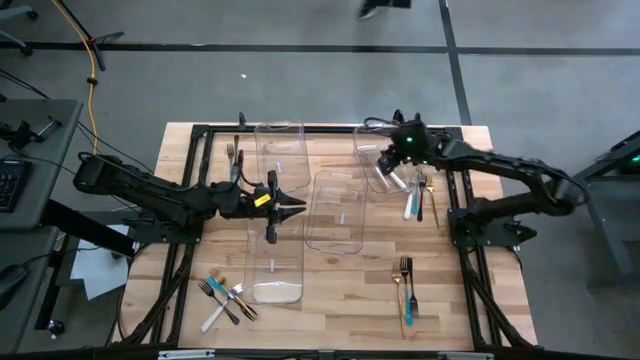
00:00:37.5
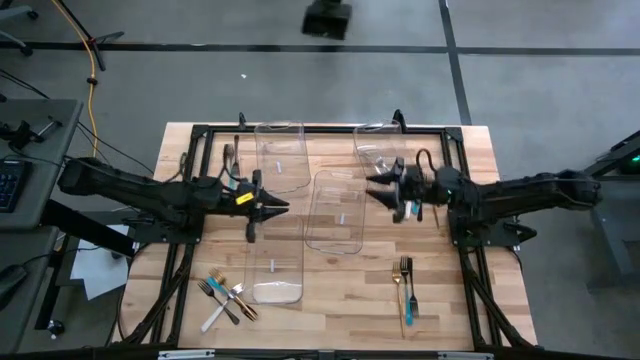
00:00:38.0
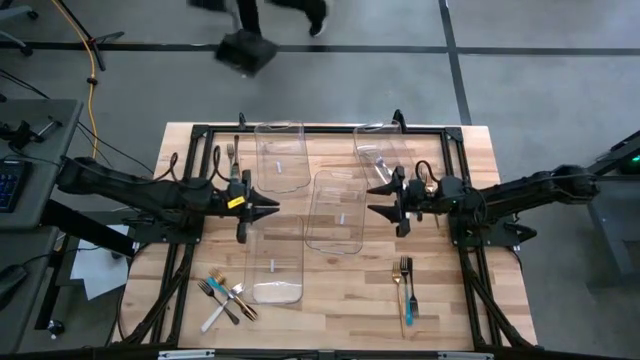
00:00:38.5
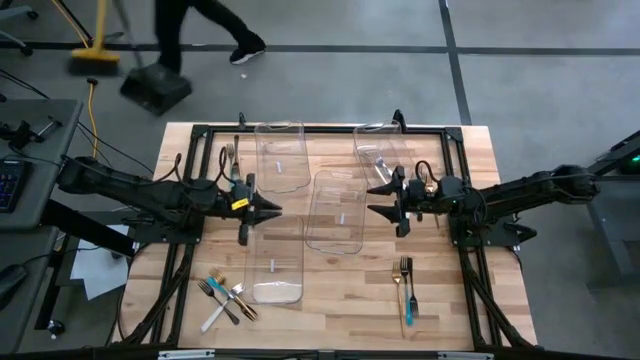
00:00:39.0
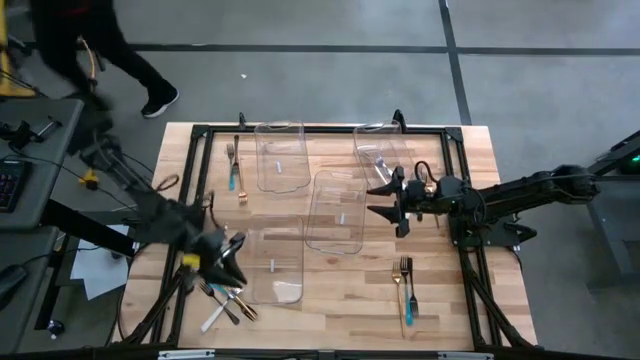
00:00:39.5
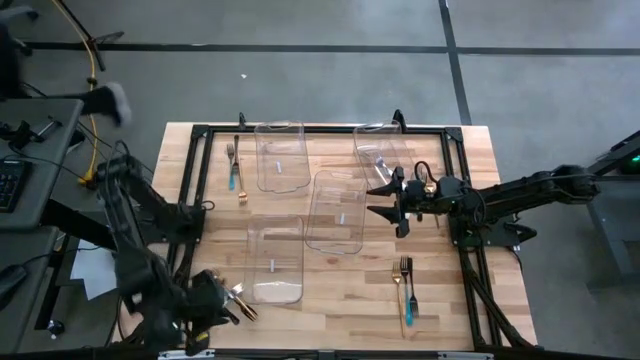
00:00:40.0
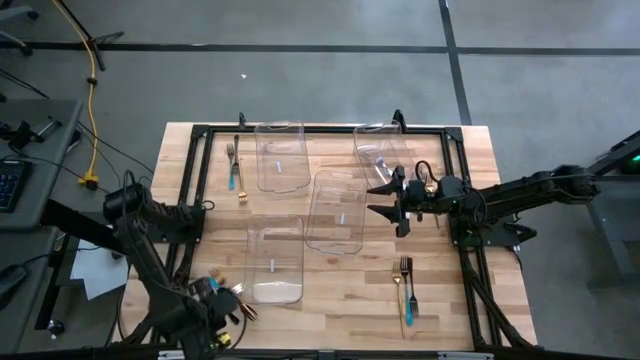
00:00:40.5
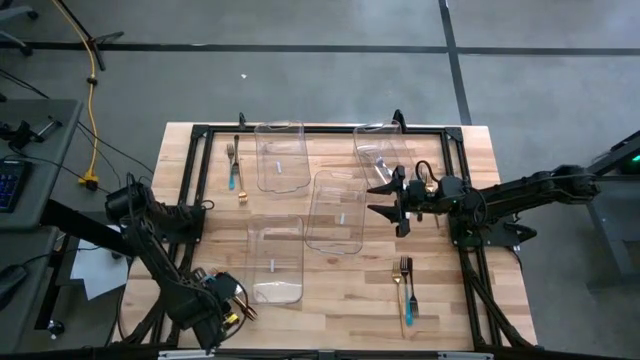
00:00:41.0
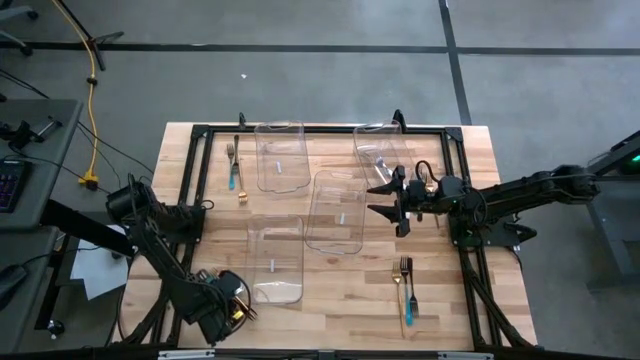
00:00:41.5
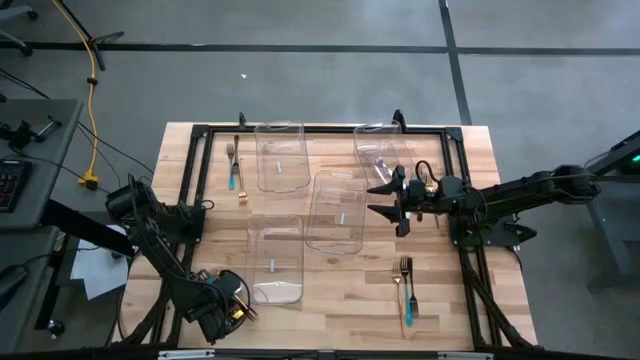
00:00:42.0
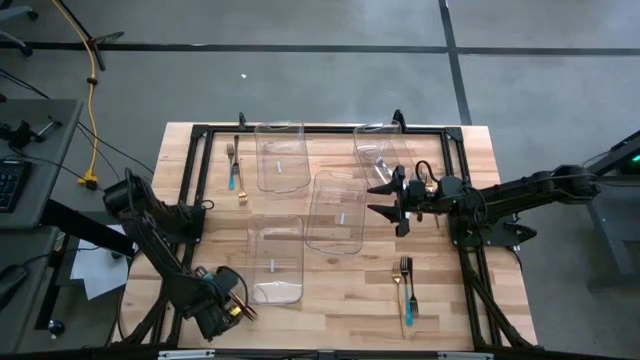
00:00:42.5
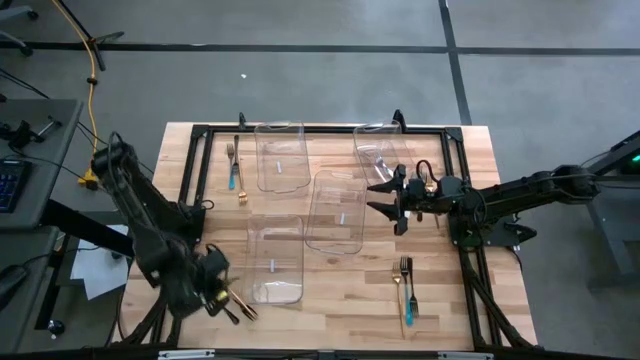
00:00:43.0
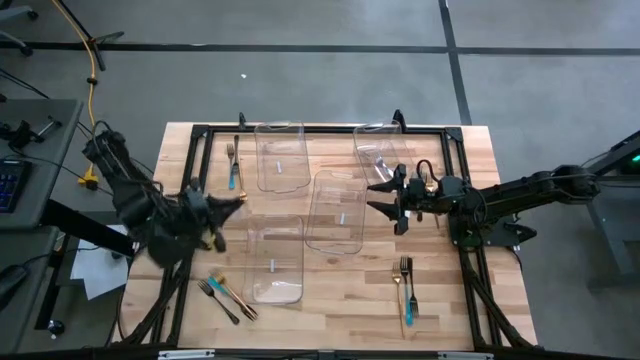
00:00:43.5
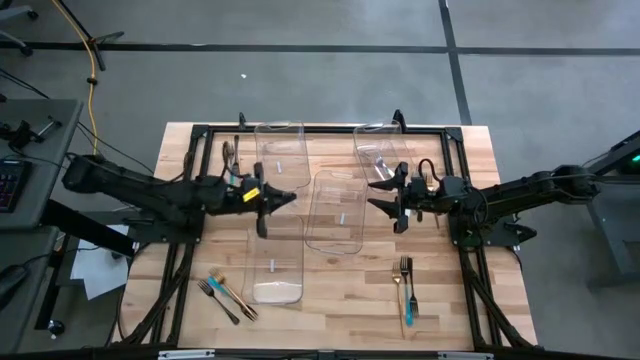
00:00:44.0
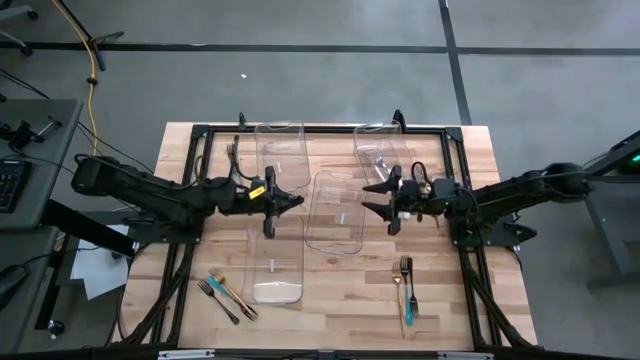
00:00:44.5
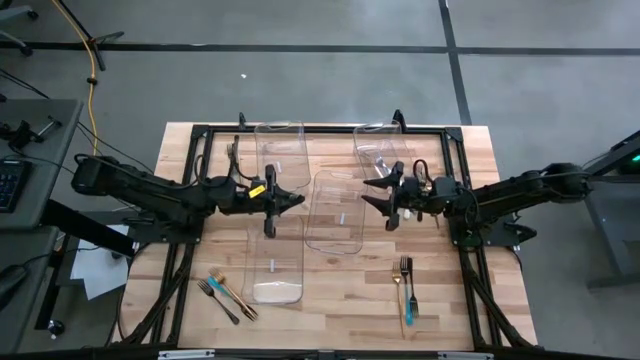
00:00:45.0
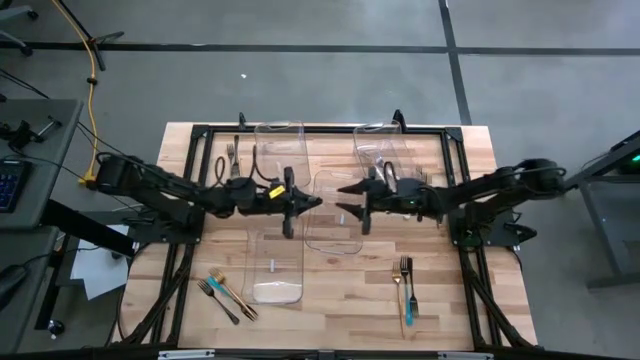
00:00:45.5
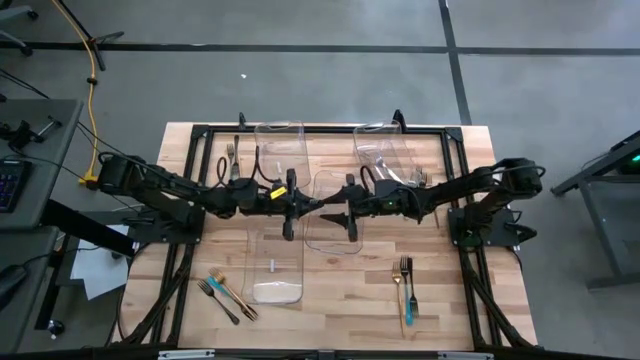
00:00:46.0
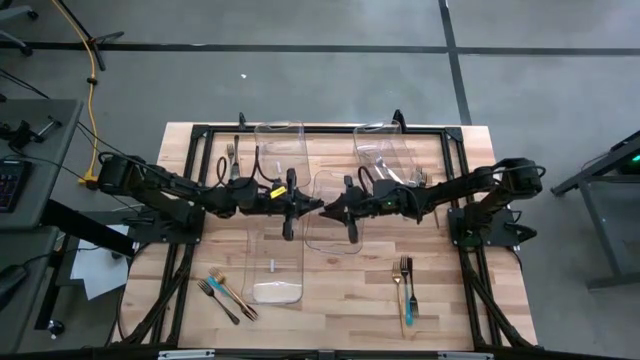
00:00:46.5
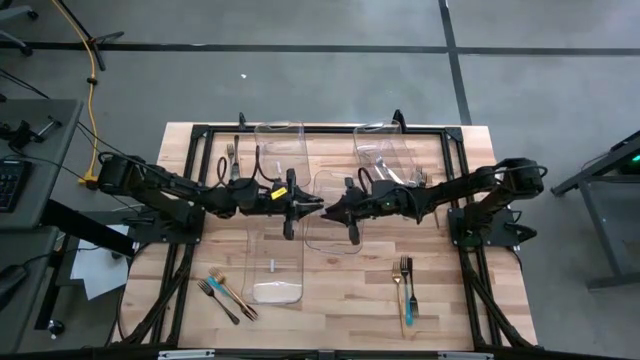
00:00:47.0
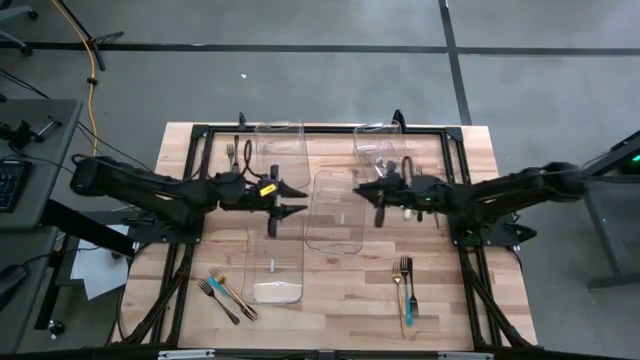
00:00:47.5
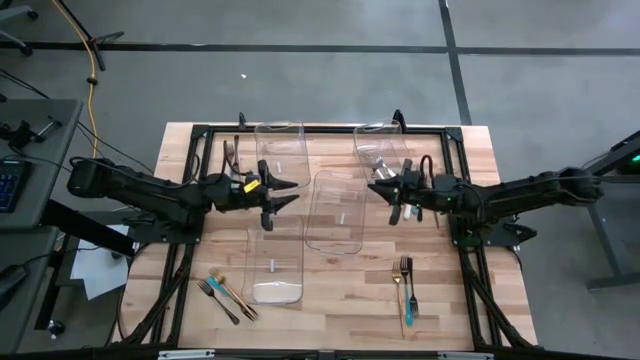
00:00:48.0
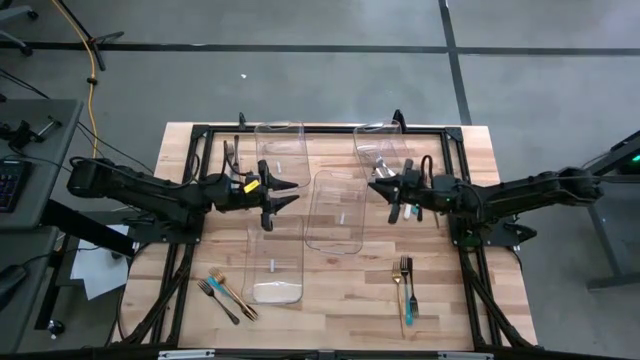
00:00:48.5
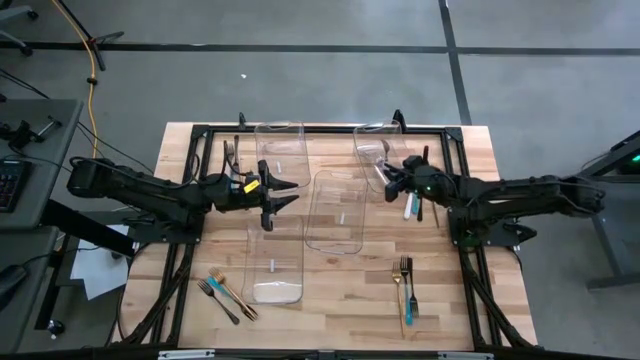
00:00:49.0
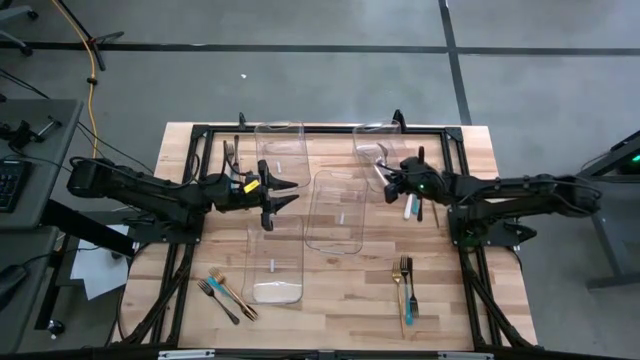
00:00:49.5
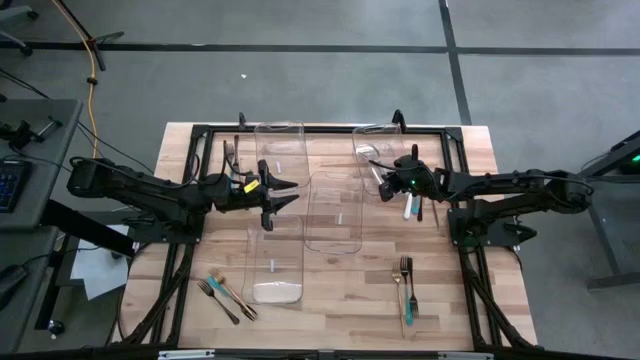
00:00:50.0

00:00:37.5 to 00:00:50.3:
Task: Sort silverware by color (type)
Put the white fork into the top right transparent bin

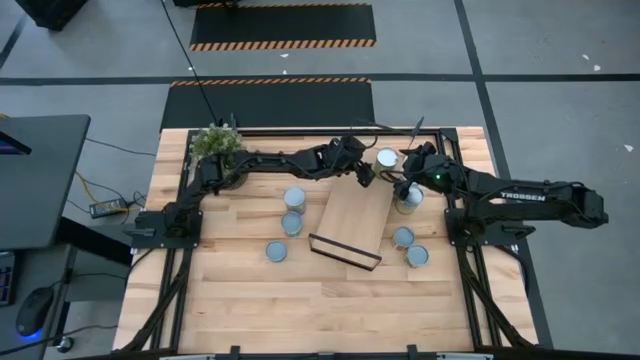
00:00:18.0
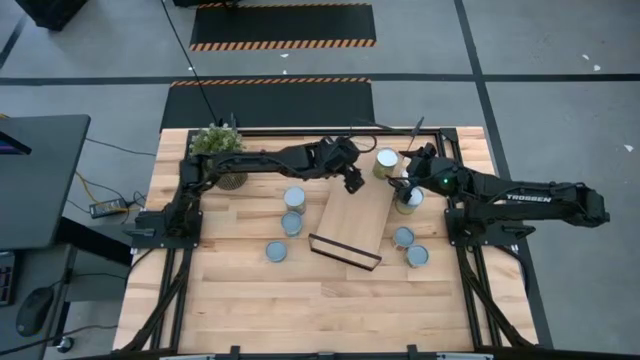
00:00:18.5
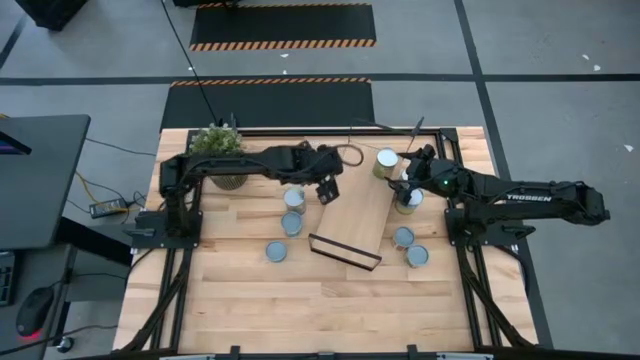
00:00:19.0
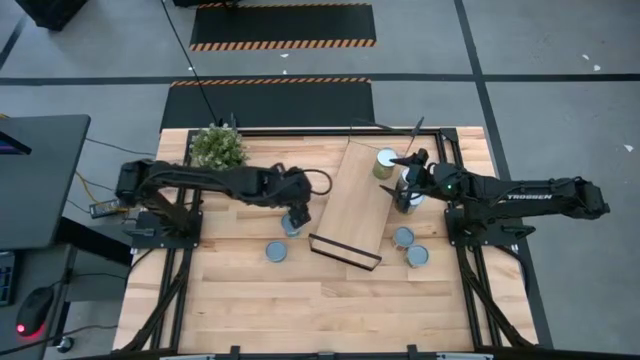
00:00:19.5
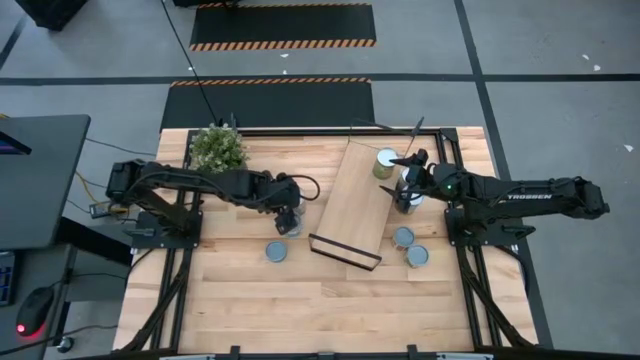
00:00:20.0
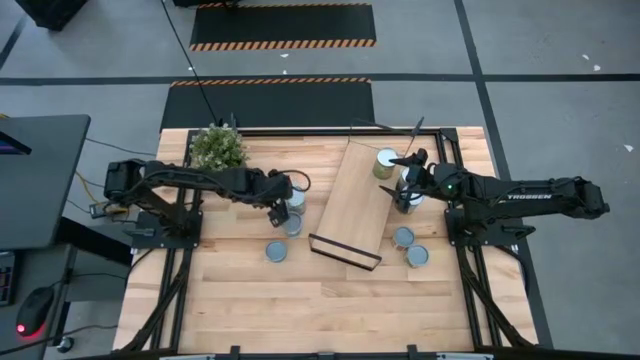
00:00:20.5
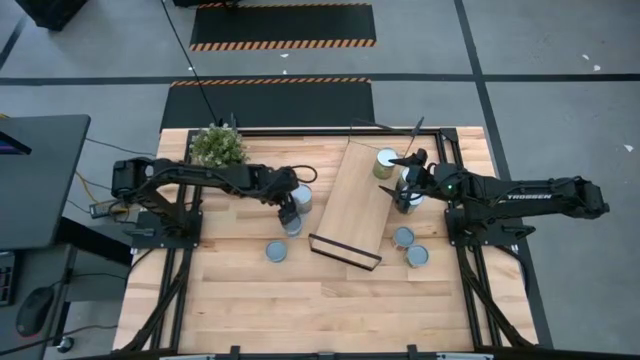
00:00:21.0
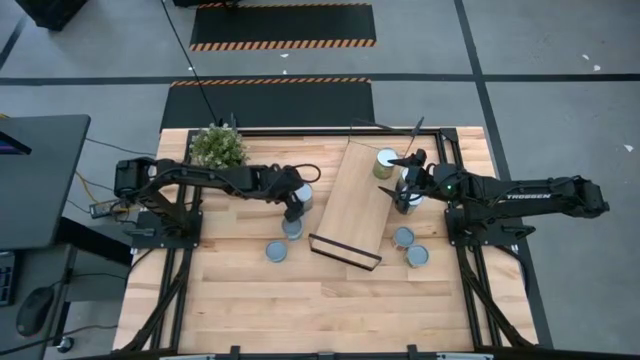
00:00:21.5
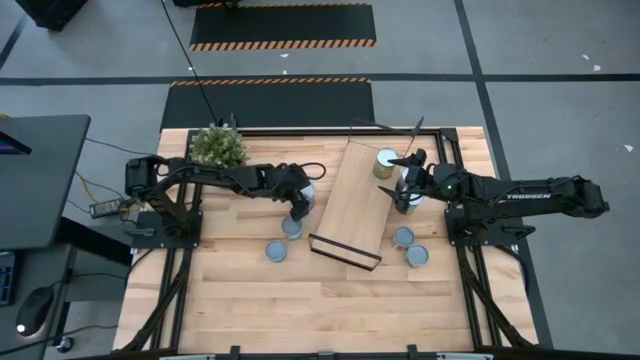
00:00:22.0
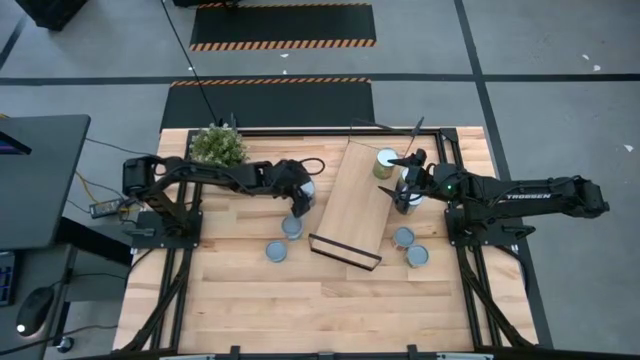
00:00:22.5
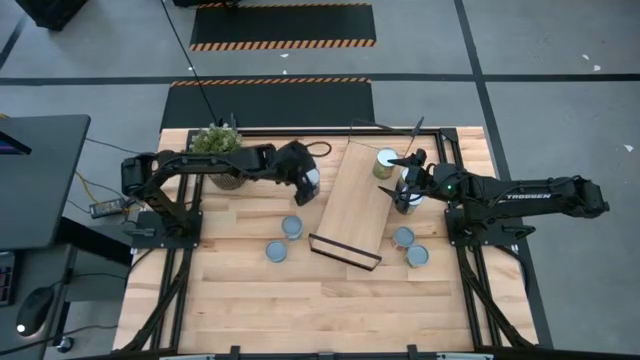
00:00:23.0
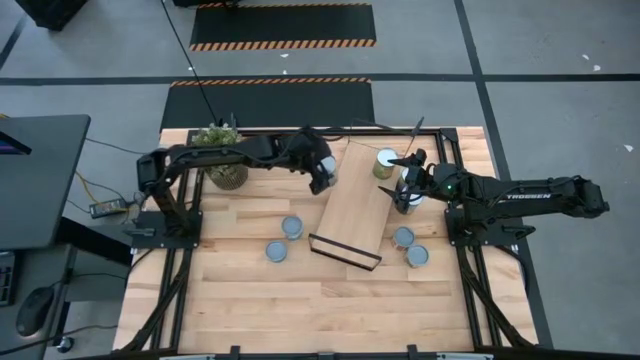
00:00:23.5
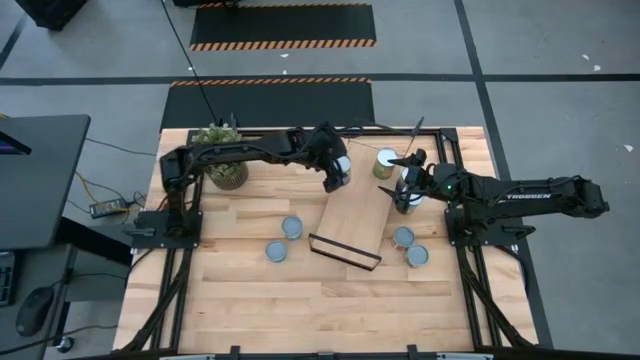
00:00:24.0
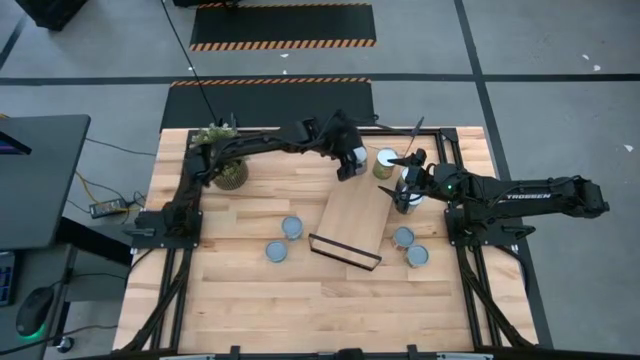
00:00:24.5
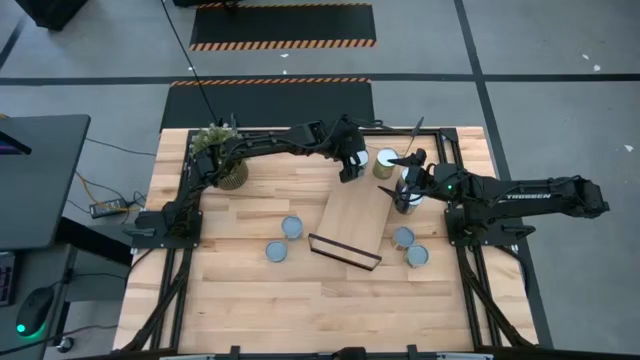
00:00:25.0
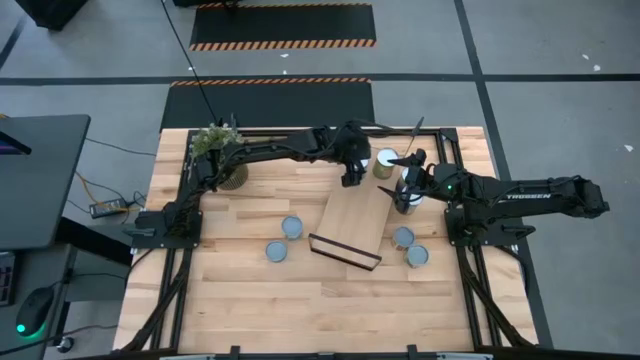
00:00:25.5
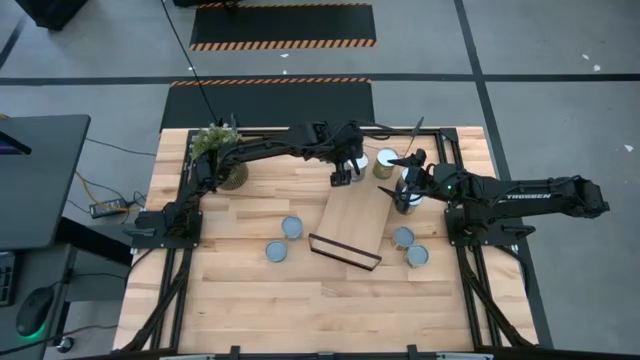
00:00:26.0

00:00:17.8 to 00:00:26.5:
Task: Pick and place cans onto a shelf
Put the canned peaches on the shelf
